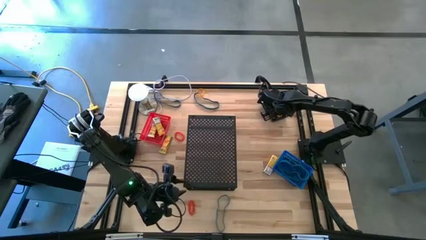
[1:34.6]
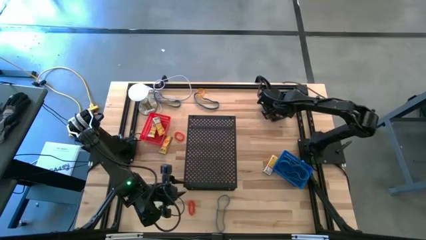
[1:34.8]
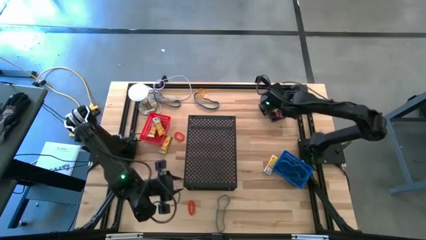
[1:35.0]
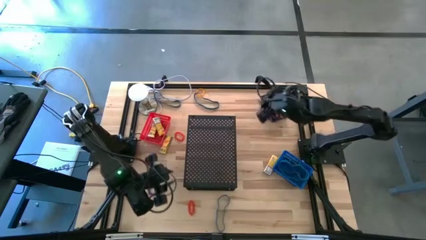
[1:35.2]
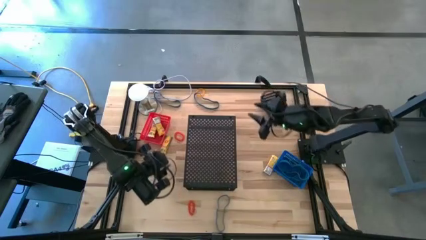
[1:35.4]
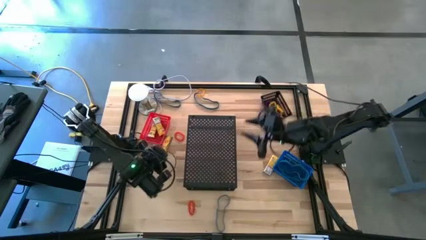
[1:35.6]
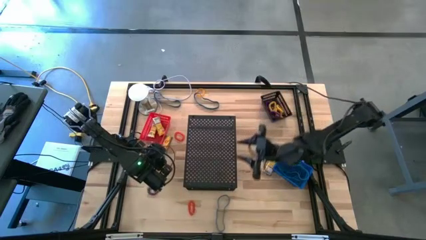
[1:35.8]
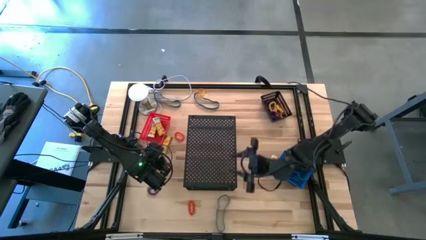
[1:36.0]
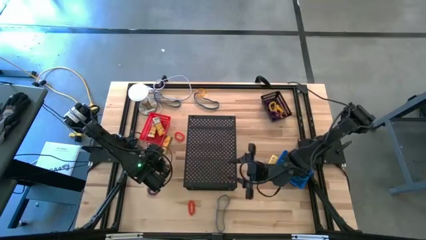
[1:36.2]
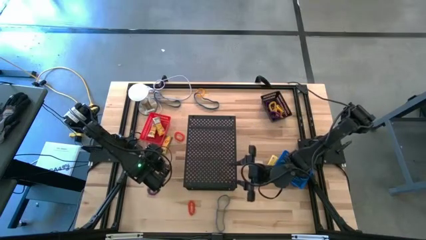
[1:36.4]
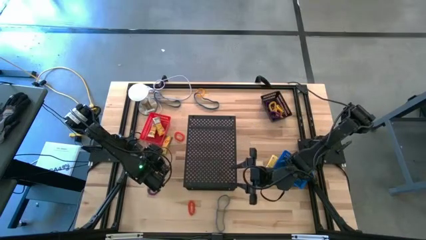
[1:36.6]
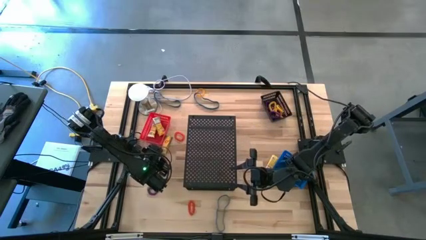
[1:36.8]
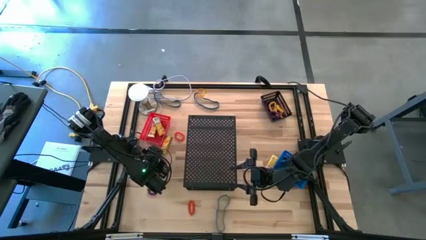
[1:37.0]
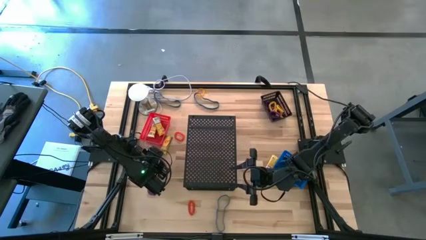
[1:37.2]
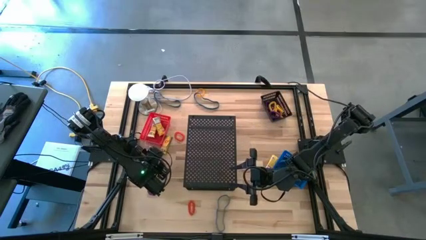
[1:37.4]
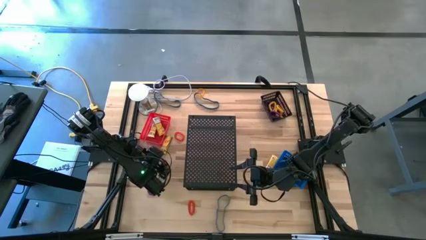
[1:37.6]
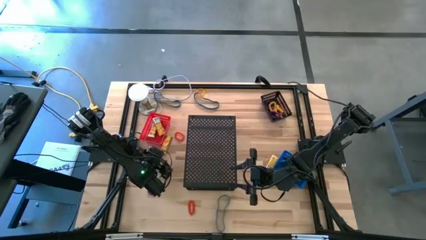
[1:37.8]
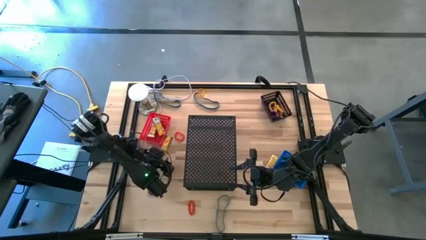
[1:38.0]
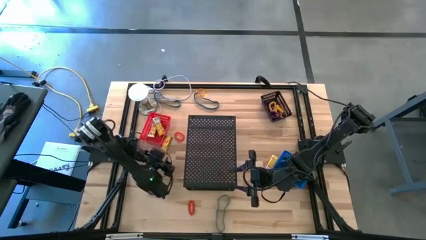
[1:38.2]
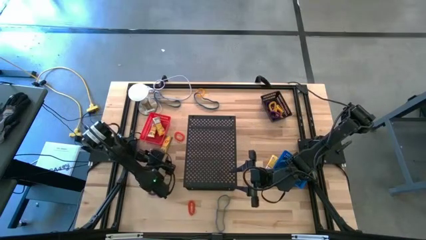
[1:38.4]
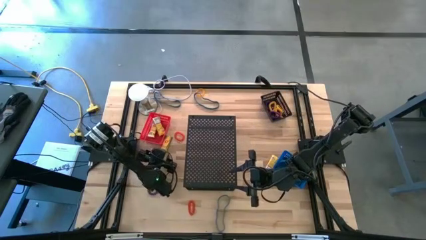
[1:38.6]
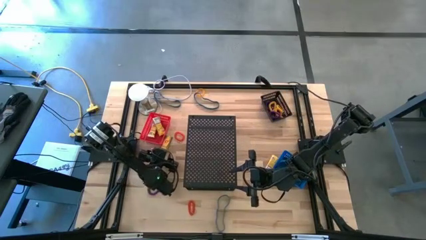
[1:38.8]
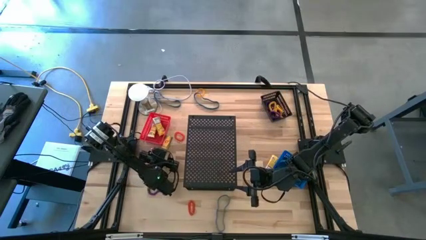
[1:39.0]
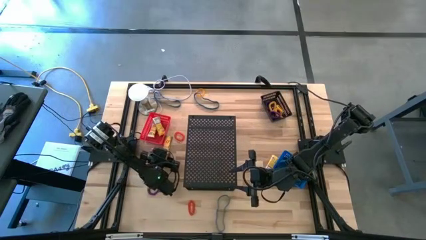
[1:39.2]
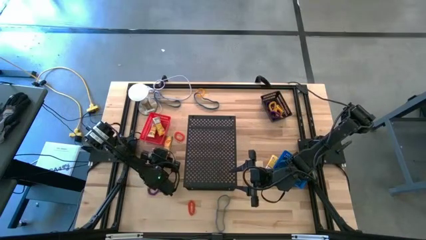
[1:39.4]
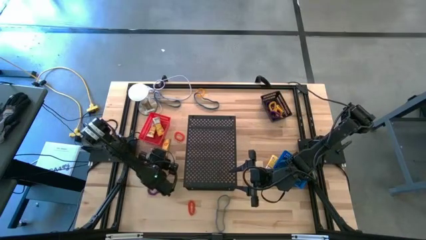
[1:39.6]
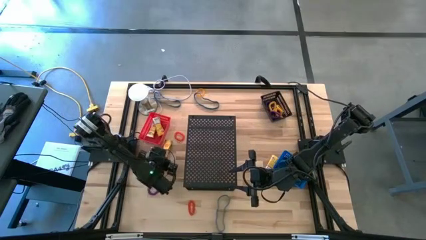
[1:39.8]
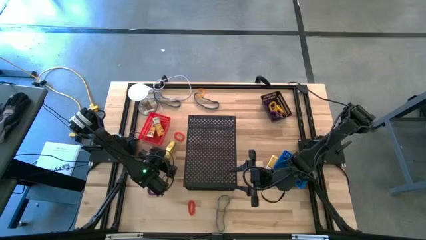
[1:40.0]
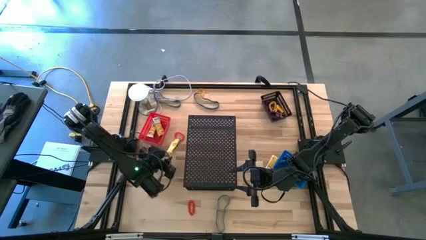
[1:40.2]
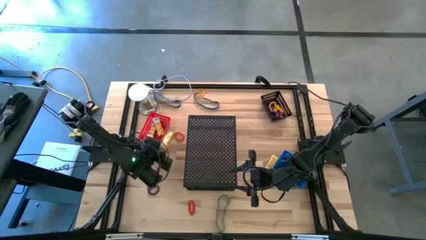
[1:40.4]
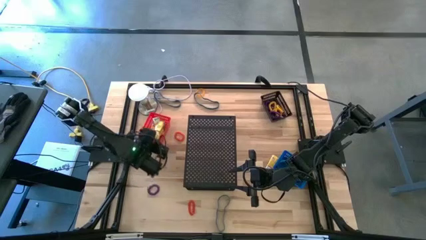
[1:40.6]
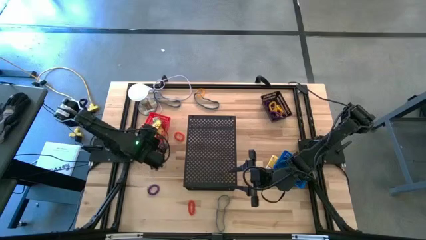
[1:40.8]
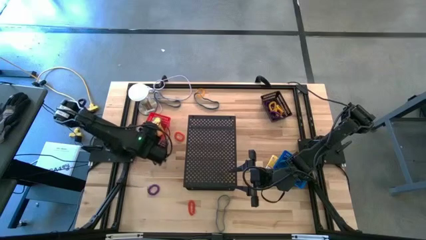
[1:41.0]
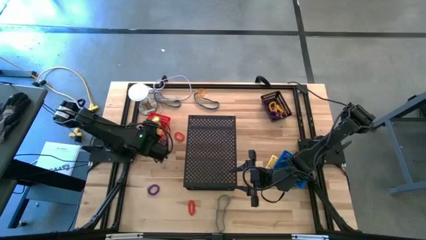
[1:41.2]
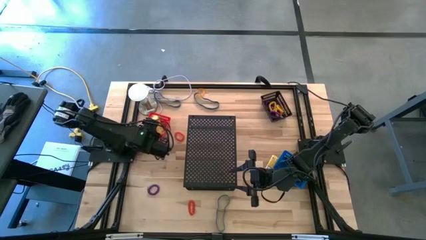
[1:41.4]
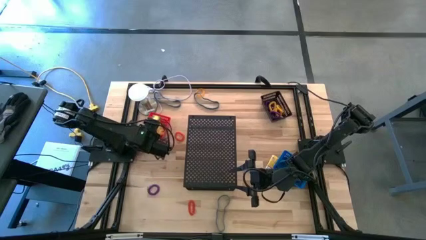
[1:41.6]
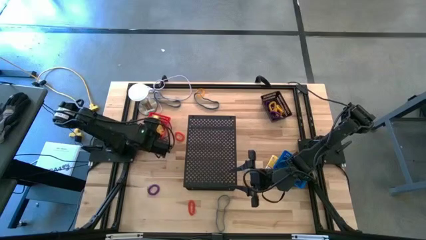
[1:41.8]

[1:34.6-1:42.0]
Task: Pick & Place Office Desk Supplies
Put the yellow crayon box into the red bin

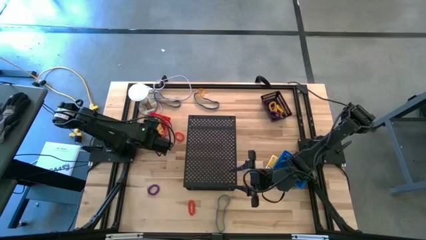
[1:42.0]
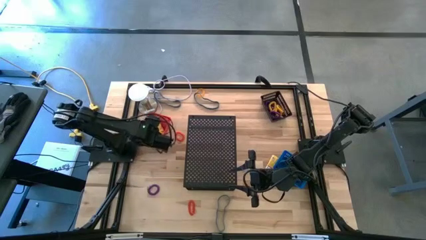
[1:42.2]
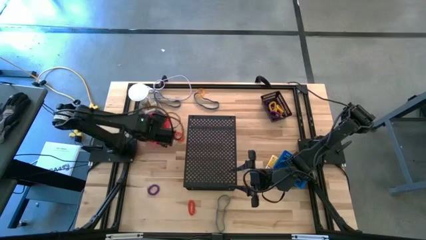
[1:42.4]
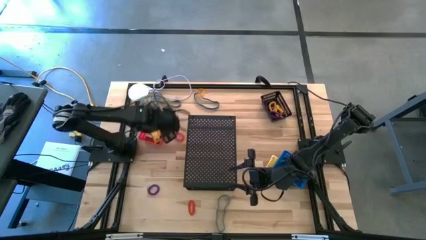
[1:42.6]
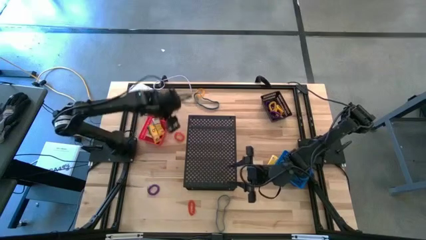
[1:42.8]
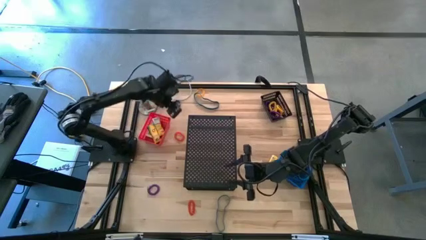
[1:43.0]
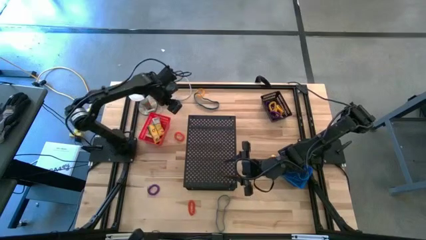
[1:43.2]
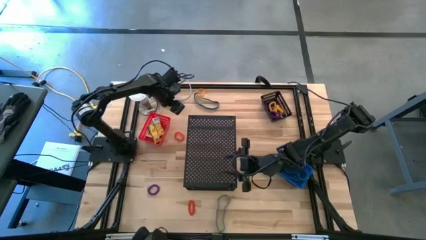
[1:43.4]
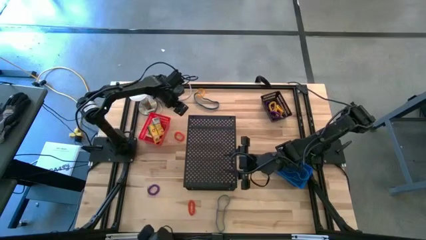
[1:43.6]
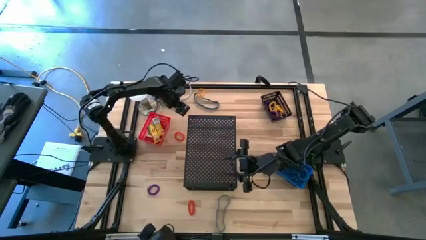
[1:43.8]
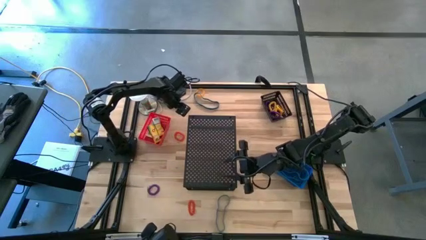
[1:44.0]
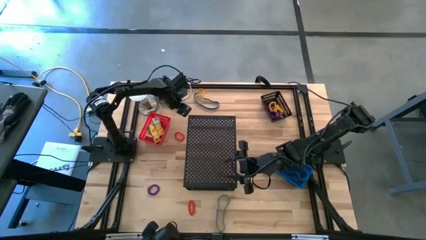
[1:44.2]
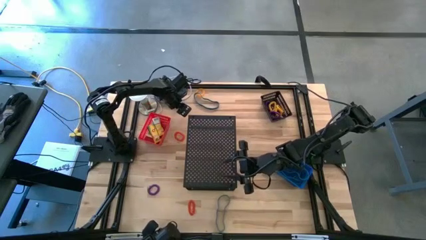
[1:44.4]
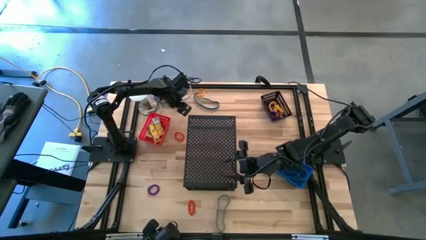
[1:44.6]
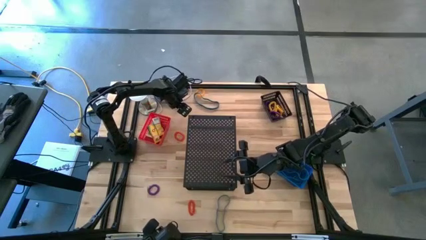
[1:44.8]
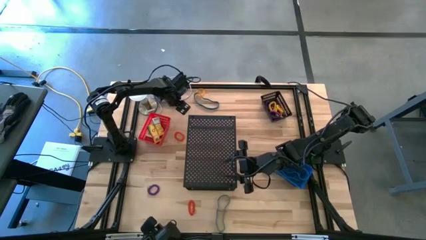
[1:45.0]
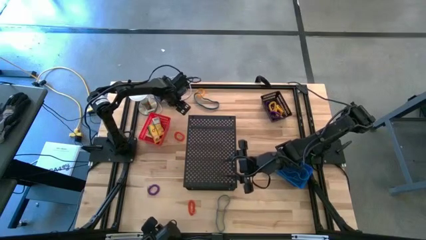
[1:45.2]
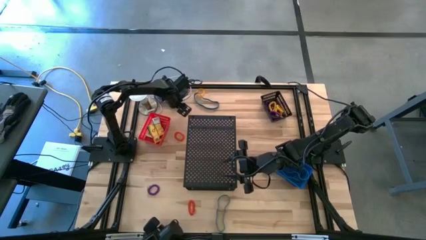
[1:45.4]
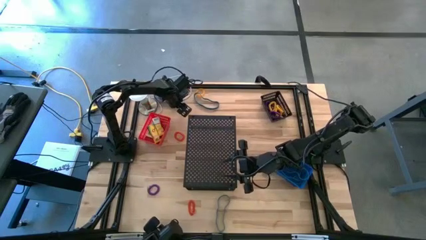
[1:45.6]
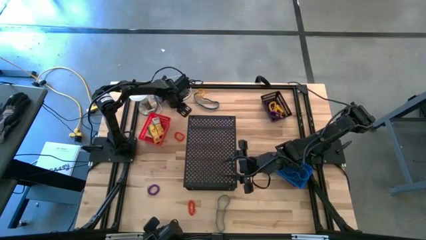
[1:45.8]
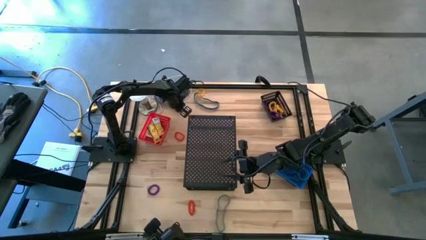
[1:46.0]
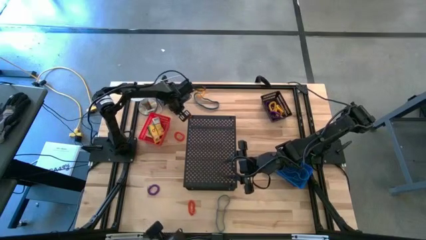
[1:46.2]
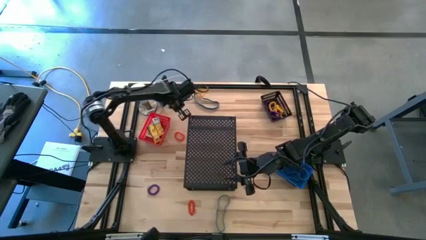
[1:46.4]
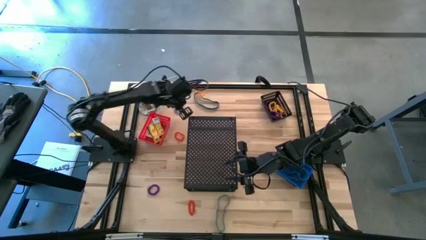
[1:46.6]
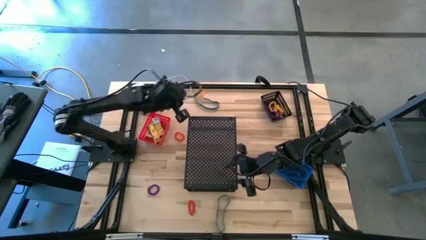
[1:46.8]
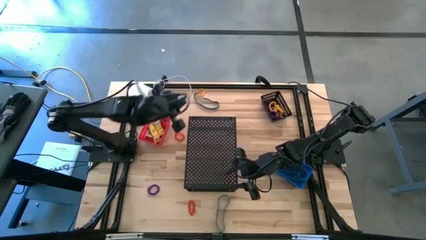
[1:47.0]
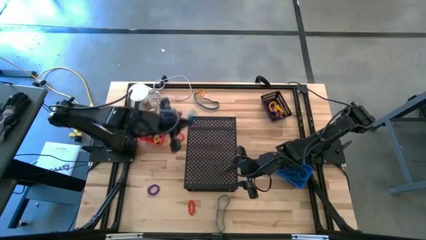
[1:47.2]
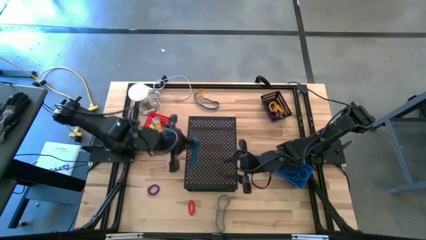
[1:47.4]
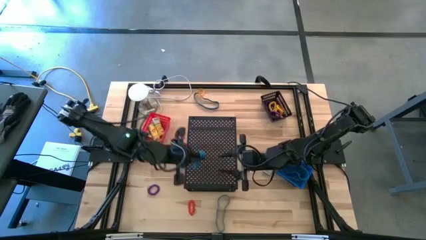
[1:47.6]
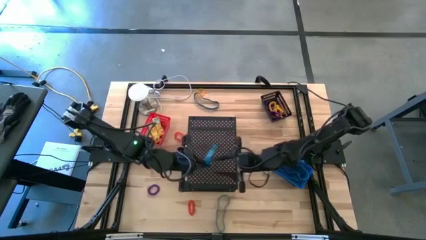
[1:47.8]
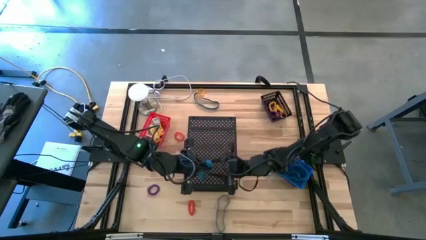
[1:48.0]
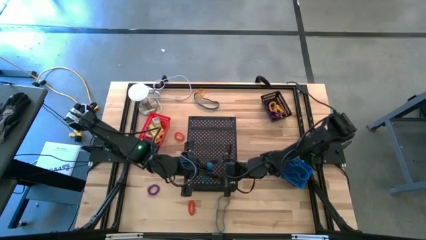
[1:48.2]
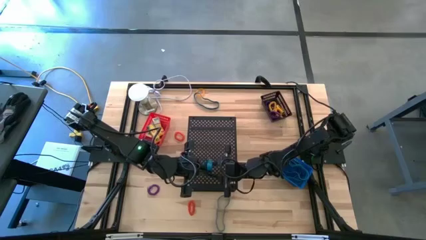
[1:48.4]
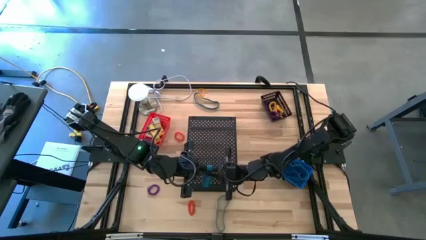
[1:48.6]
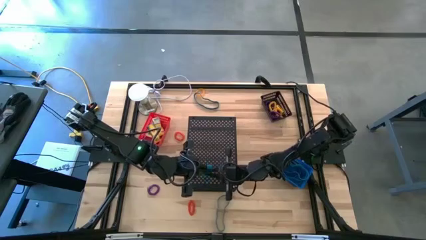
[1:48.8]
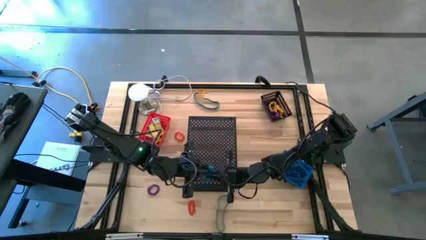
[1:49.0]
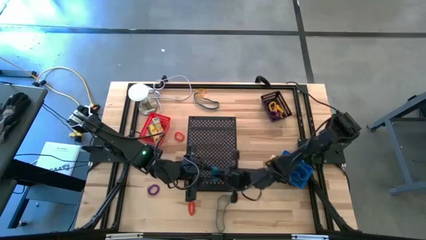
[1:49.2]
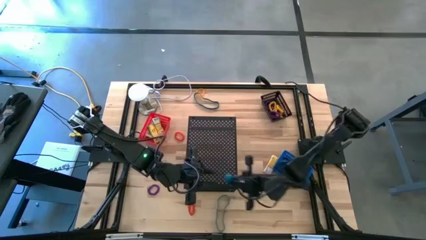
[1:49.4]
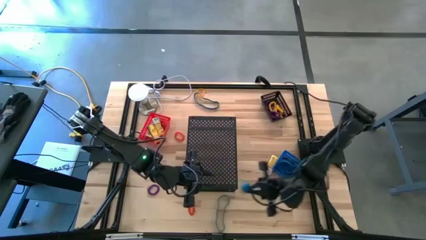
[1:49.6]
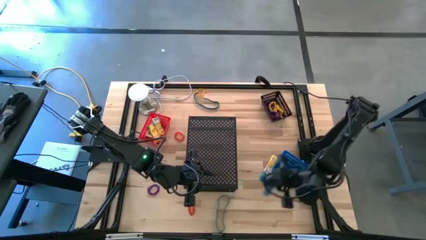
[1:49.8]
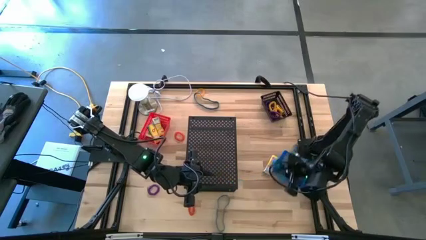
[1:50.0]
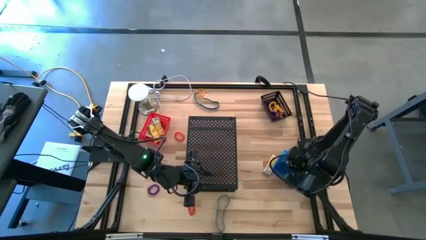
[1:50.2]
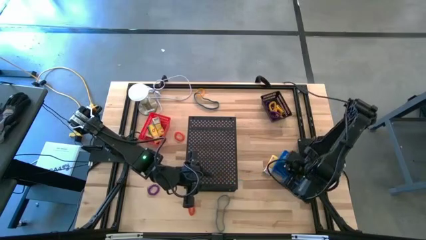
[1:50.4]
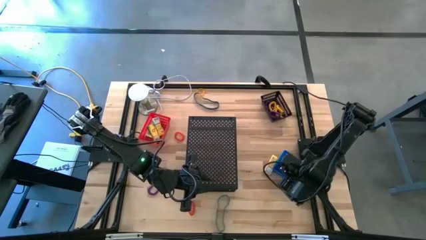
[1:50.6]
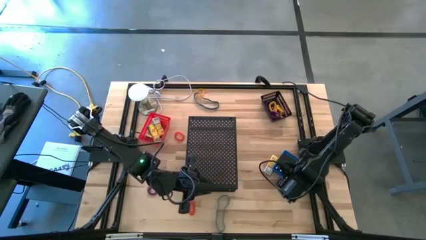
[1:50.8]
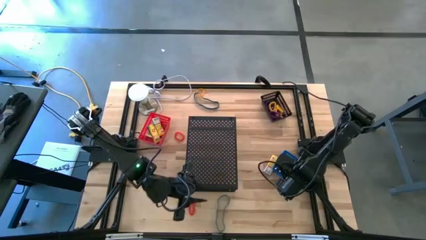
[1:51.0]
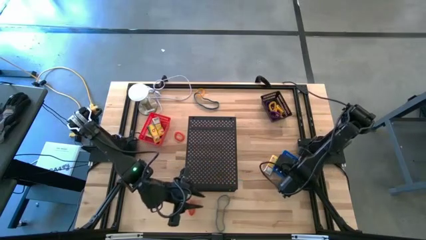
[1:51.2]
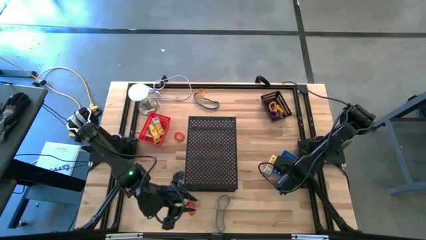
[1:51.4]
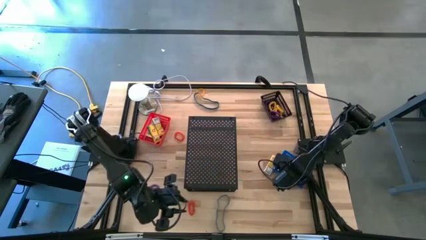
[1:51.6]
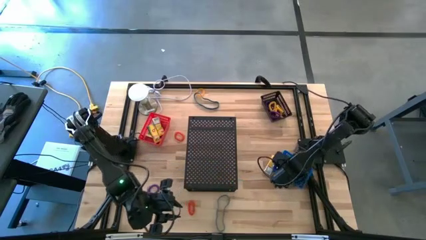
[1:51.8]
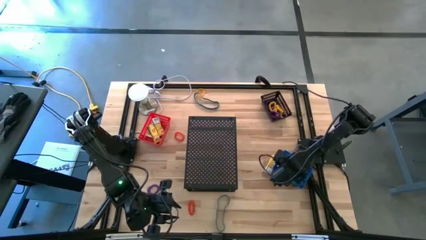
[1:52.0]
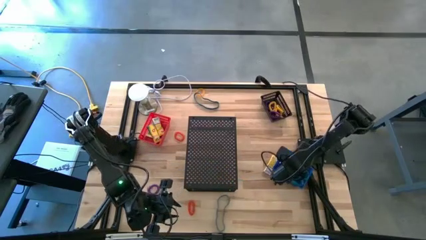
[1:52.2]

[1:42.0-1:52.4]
Put the blue rubber band into the blue bin
